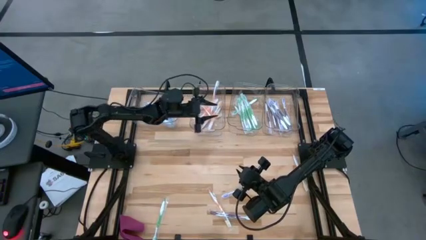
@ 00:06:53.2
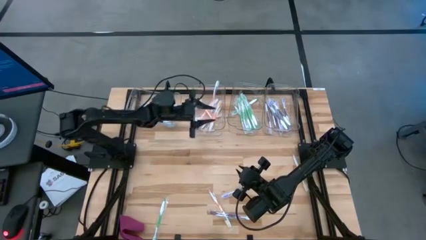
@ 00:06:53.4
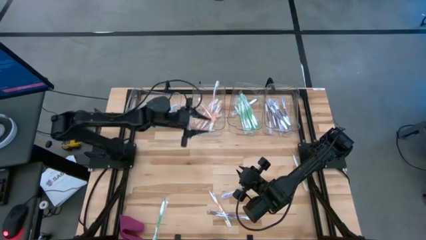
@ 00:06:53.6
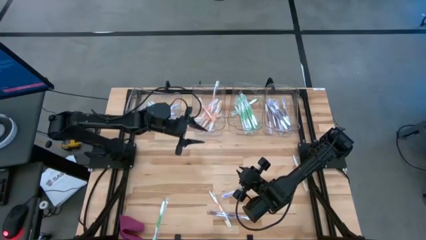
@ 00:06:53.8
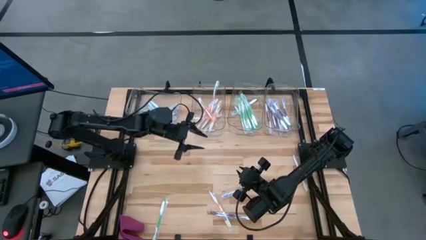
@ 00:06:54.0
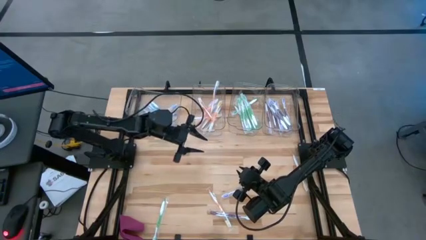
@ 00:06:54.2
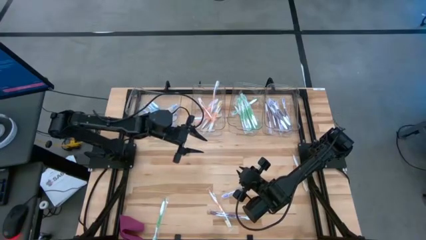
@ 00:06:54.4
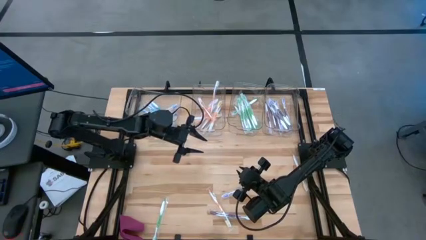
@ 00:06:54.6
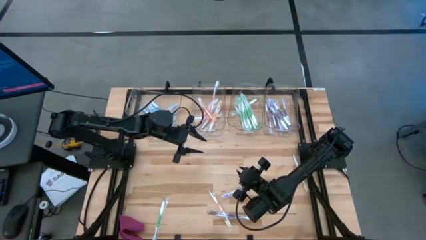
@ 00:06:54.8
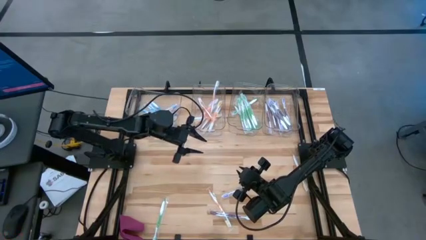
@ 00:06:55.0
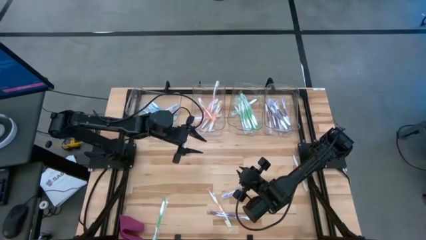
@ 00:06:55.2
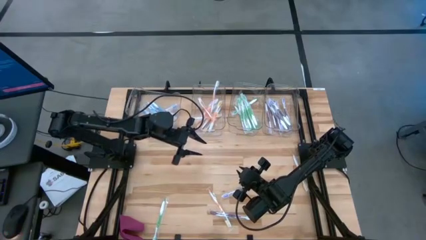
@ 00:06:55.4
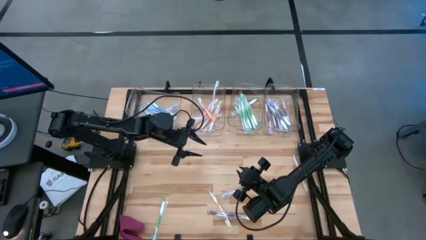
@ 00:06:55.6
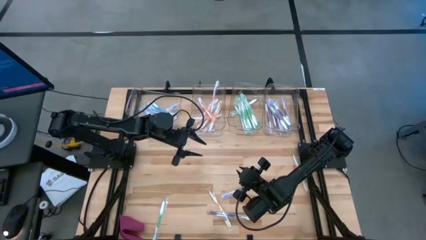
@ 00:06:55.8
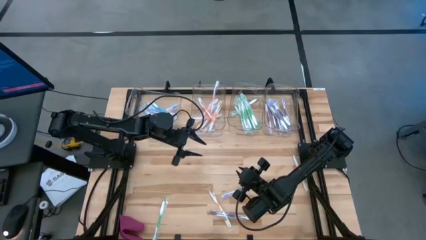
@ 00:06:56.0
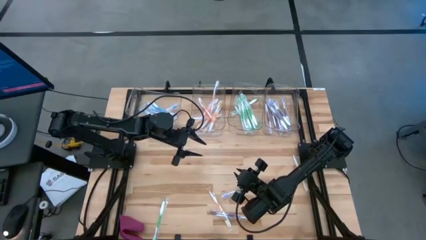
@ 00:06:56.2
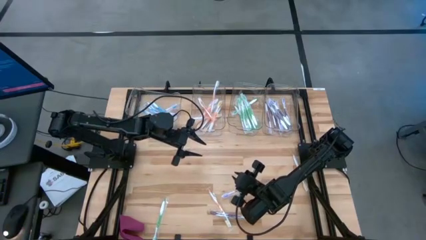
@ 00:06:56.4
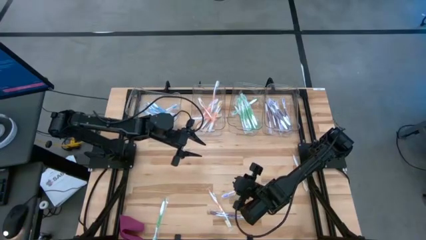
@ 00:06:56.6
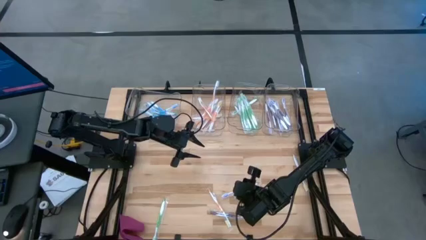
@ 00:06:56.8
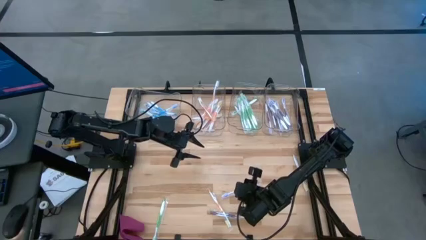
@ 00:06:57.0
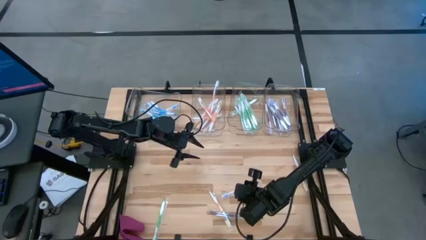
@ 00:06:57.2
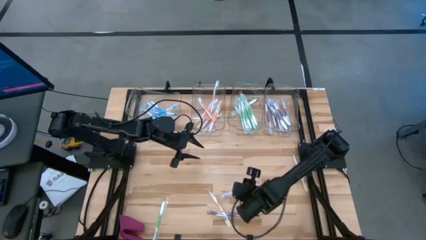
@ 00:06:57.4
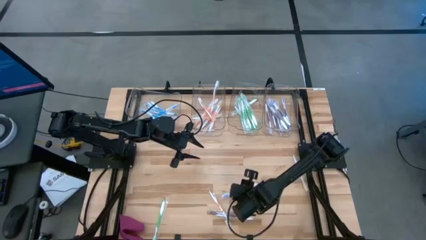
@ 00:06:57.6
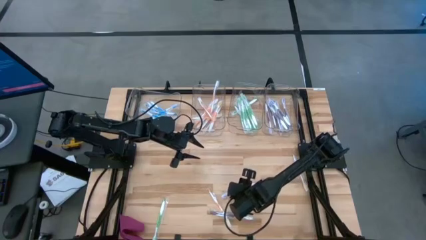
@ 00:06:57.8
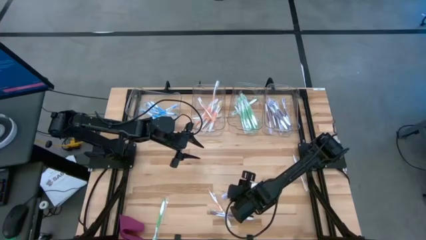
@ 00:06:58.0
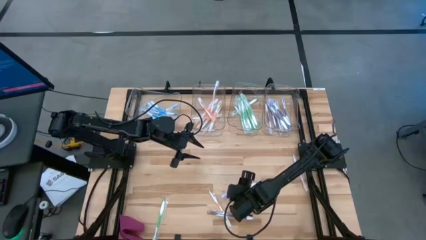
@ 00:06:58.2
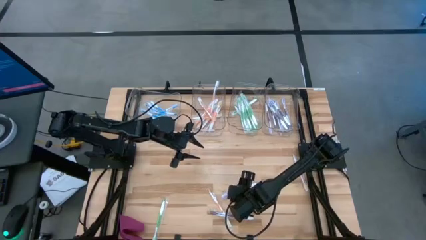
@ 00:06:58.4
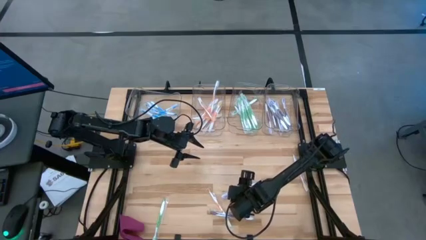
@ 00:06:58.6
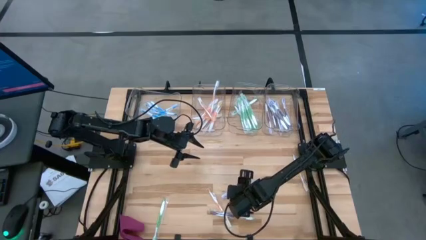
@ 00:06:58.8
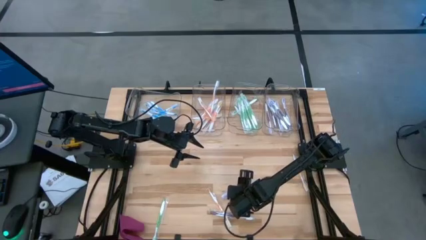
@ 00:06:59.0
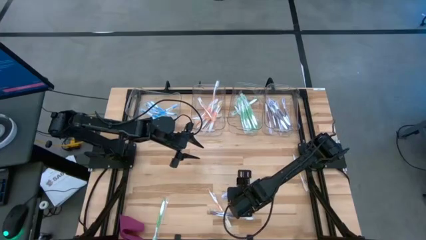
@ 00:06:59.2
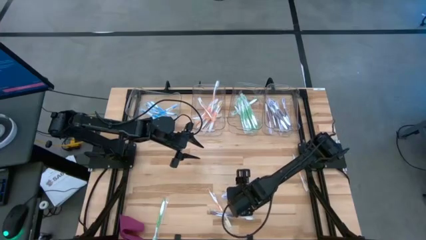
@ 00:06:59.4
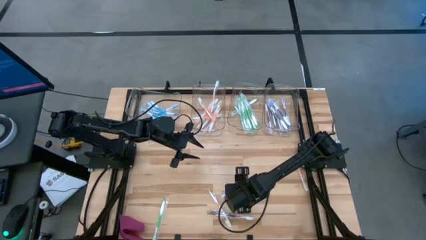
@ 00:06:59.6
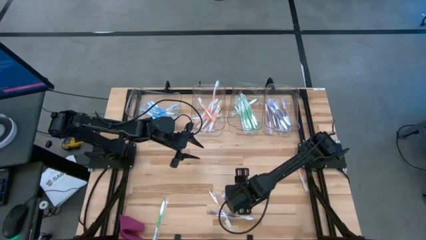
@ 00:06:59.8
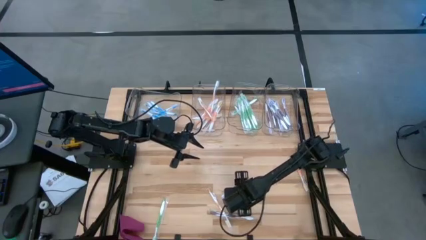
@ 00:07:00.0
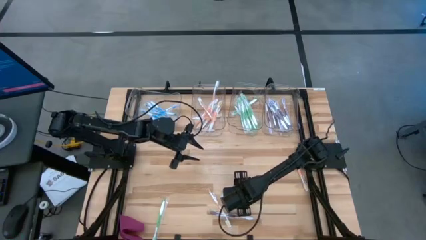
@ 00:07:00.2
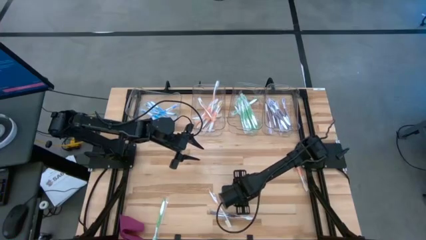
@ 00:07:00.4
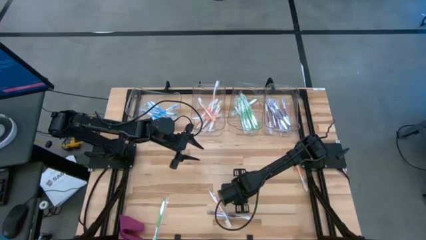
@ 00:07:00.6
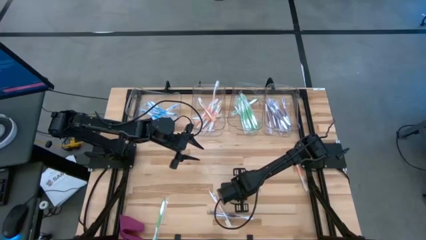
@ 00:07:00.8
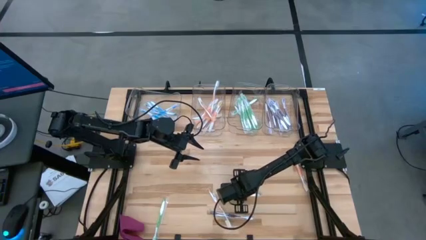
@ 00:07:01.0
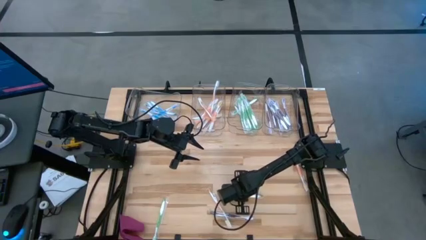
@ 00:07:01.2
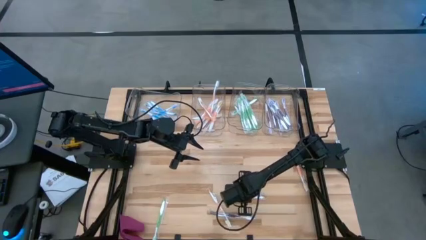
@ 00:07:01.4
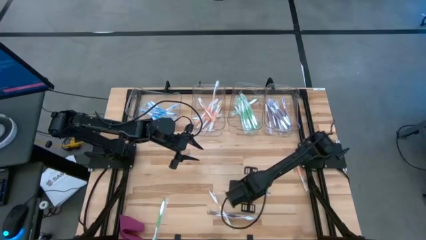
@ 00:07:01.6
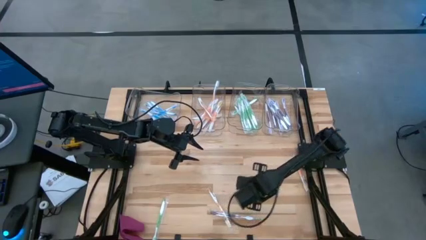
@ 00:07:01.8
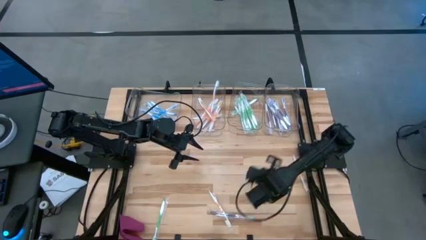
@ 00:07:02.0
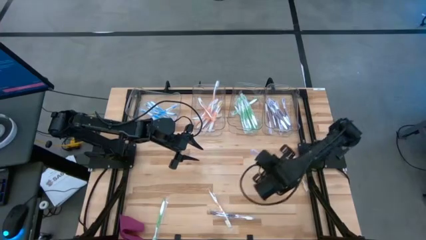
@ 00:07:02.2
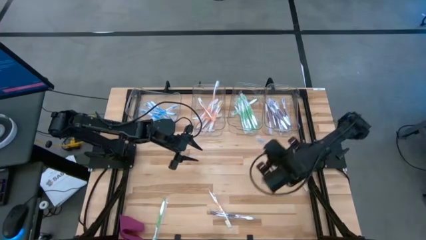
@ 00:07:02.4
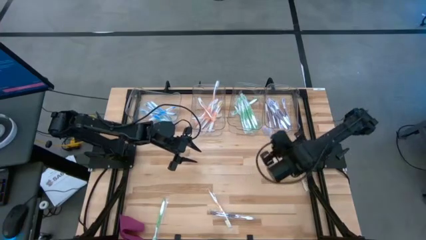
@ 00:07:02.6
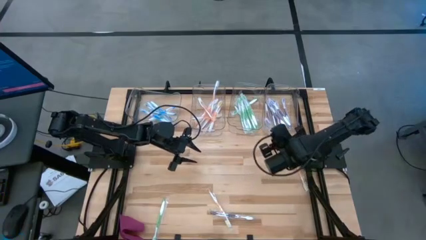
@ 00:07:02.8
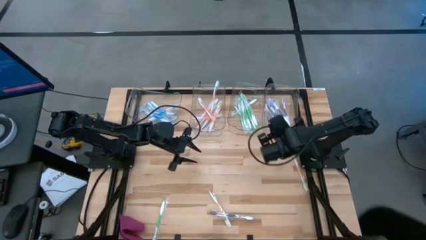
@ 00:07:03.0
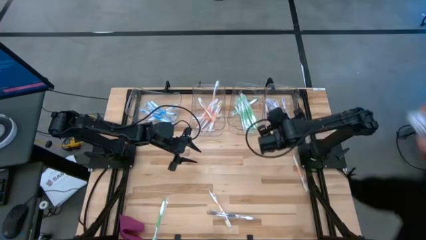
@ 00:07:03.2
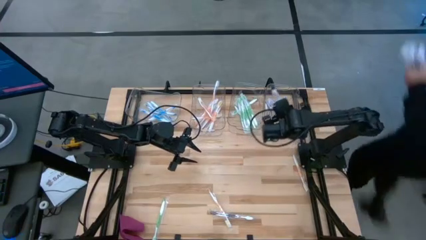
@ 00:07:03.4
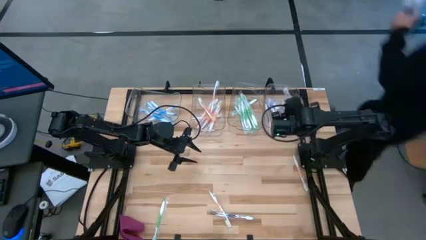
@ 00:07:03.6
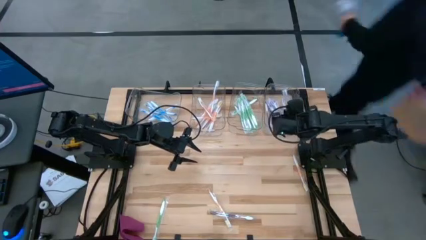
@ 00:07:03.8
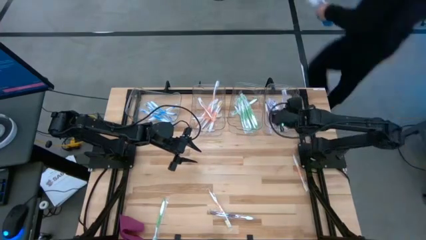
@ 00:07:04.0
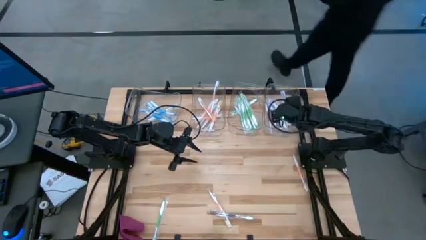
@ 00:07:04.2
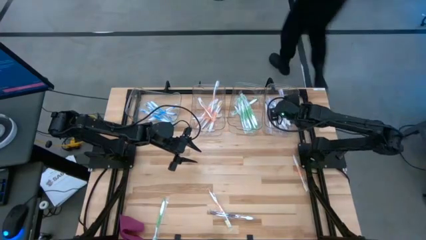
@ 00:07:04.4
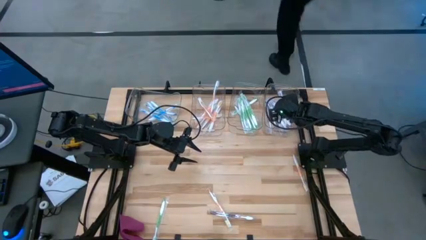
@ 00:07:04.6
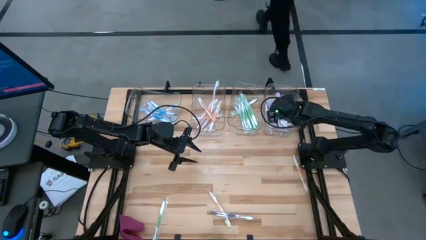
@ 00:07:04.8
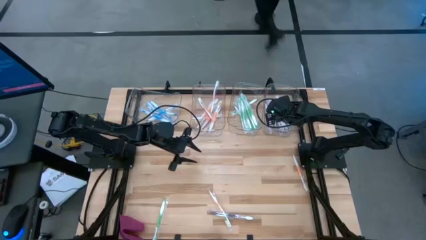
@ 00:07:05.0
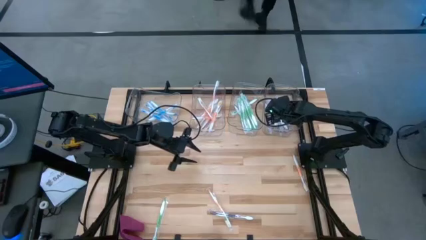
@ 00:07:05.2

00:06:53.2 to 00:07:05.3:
Task: Pick & Place Toothbrushes
Put the violet toothbrush into the right transparent bin

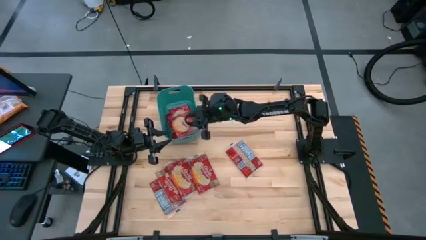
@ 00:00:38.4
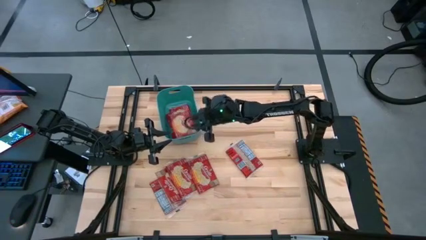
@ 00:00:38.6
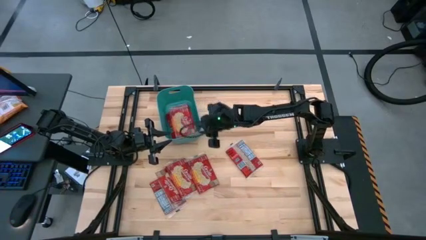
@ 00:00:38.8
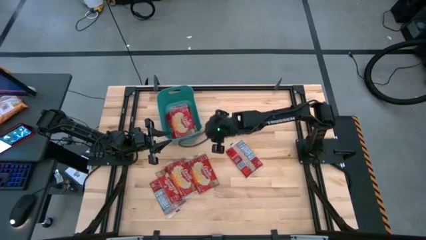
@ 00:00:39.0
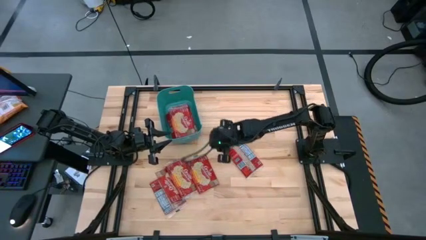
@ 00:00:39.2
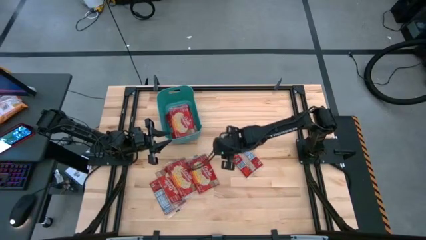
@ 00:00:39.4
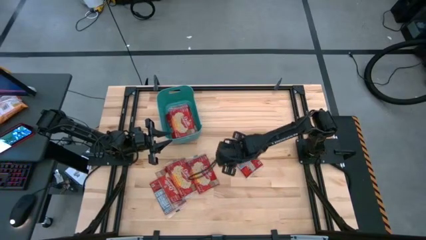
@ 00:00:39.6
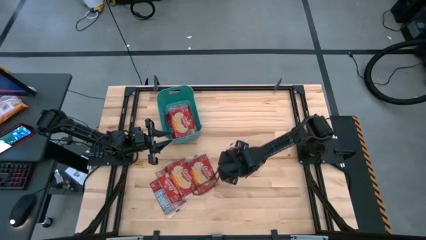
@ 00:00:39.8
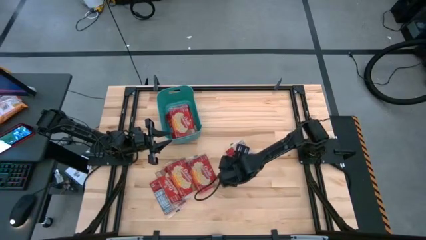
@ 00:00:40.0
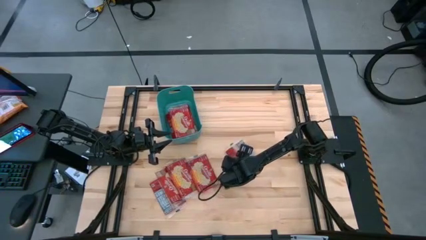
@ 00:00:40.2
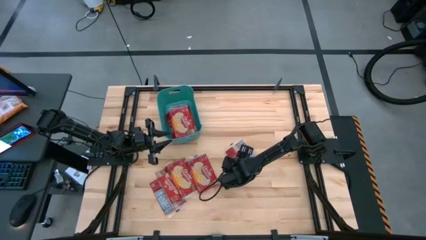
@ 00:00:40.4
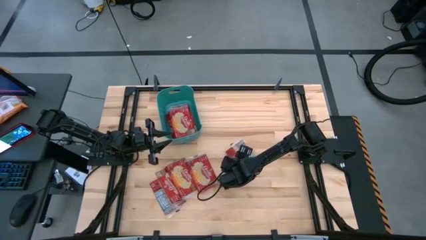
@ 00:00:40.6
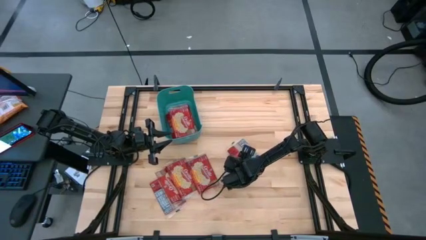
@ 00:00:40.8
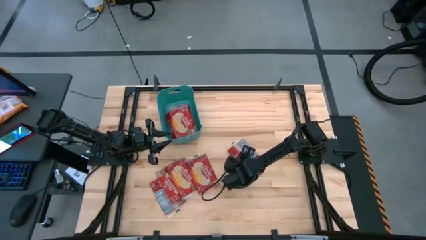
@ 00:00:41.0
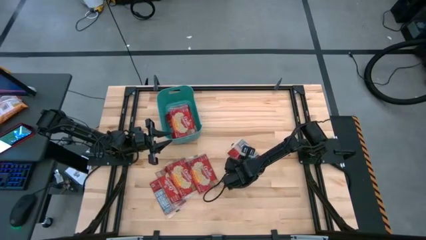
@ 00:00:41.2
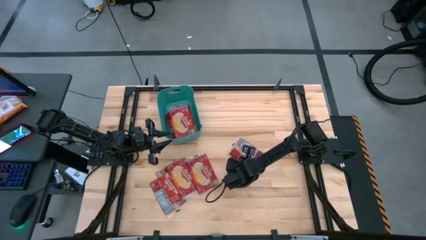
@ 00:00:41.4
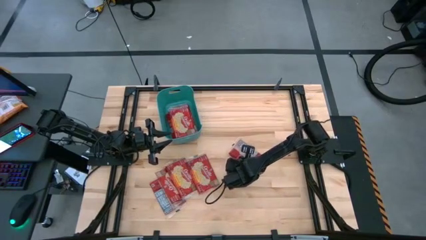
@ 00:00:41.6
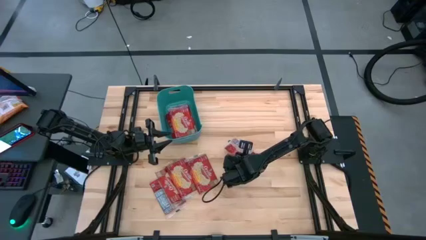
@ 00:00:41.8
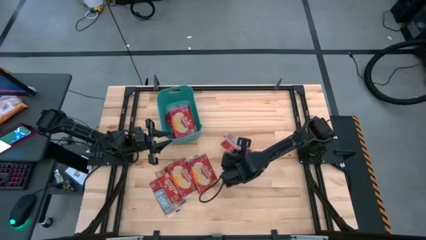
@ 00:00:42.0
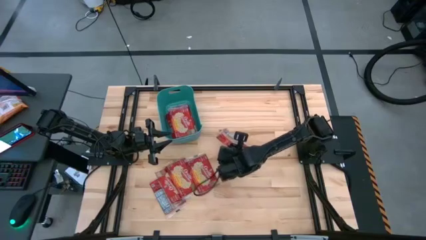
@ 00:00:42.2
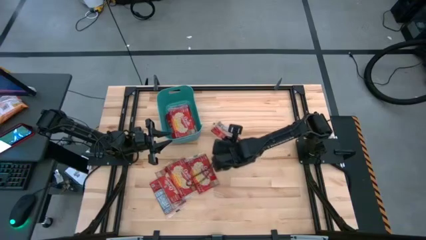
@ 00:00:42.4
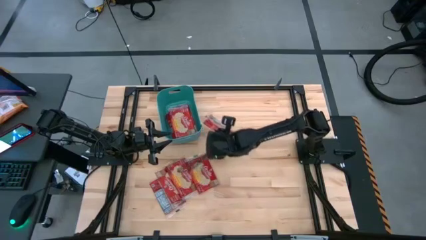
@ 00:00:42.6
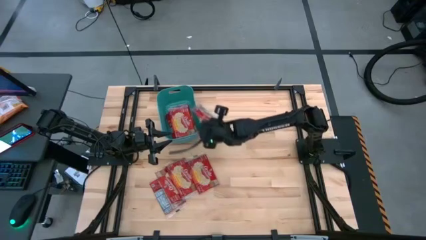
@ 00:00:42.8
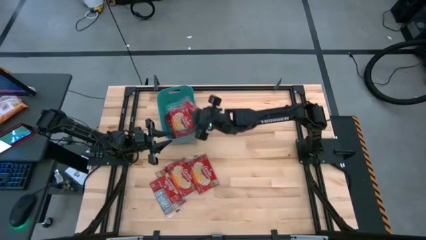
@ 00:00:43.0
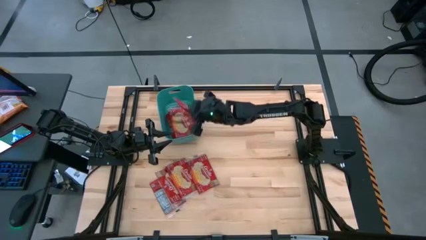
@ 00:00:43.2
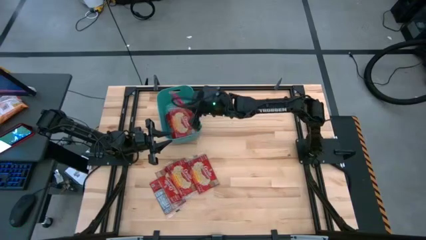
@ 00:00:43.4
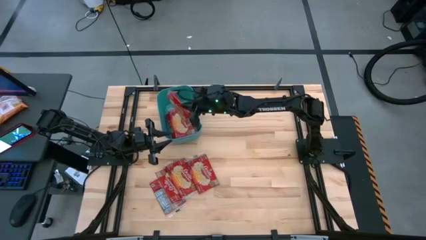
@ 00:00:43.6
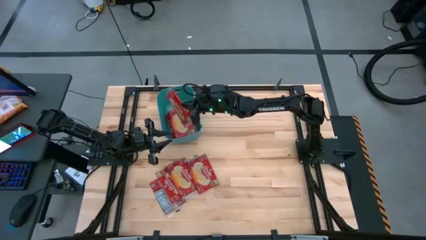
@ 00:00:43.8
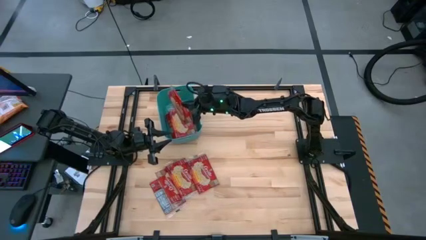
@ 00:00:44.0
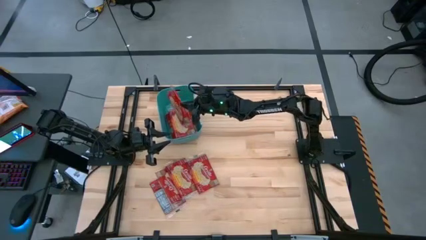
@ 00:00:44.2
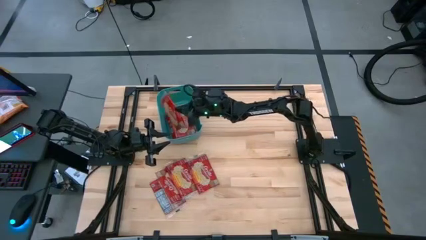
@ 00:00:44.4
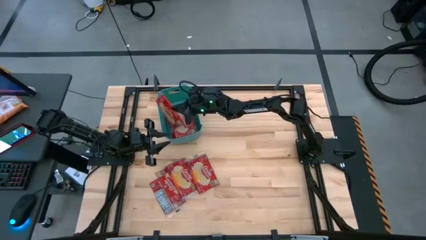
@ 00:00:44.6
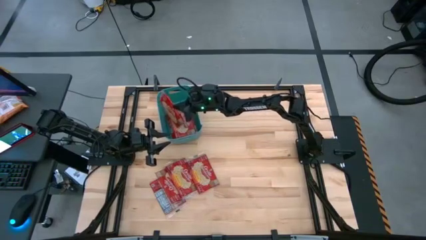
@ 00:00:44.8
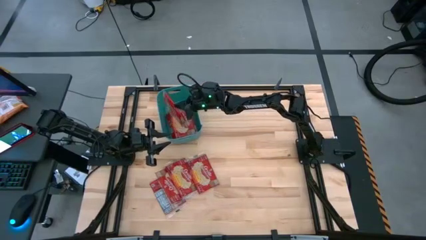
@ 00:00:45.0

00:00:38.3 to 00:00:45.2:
Task: Sort popcorn bags into baskets
Put the red popcorn bag into the green bin
